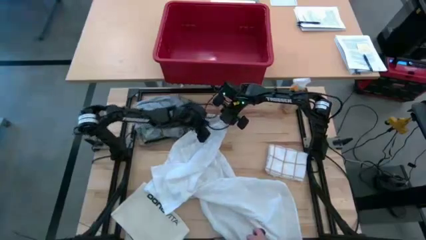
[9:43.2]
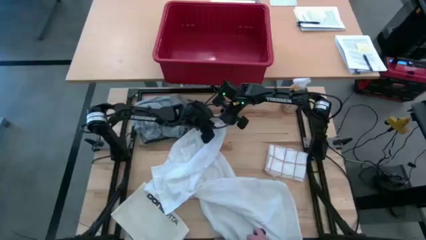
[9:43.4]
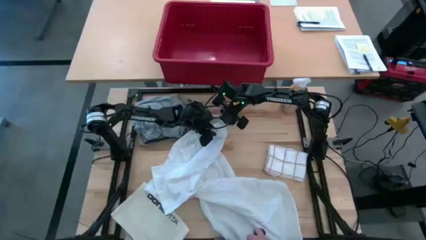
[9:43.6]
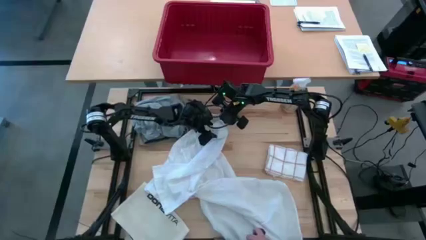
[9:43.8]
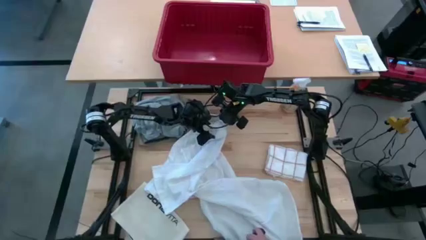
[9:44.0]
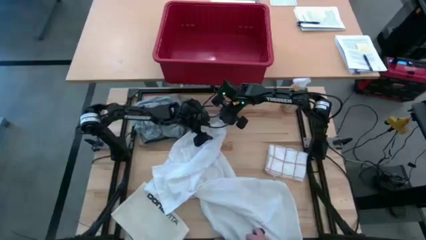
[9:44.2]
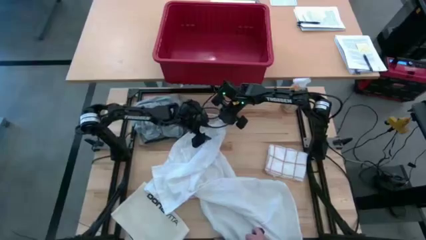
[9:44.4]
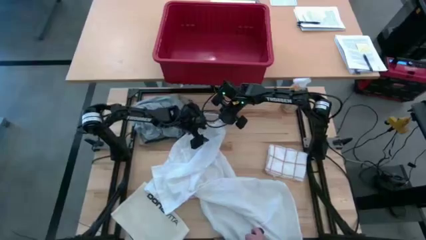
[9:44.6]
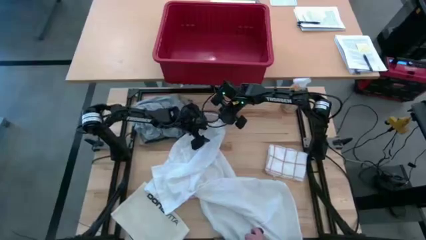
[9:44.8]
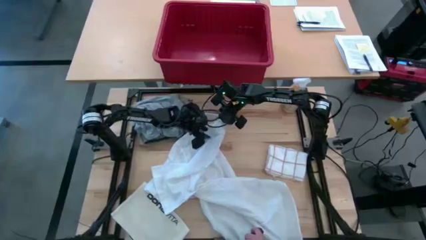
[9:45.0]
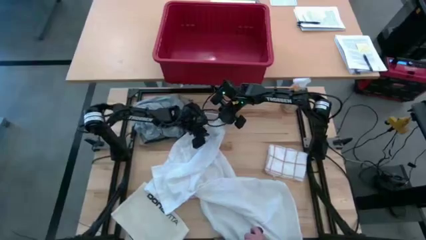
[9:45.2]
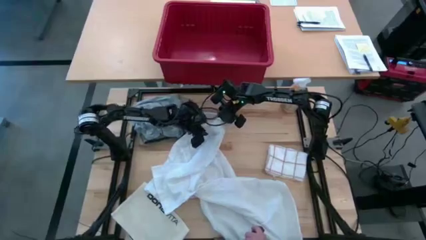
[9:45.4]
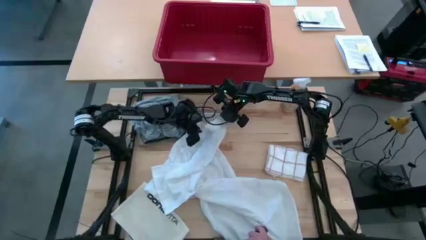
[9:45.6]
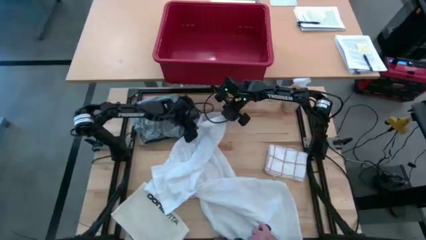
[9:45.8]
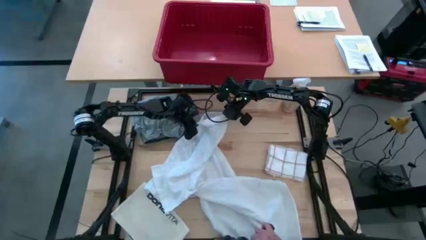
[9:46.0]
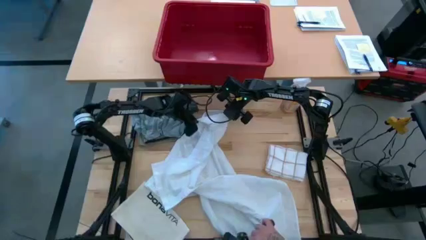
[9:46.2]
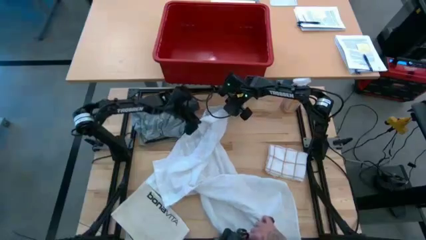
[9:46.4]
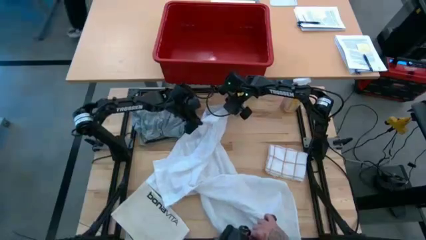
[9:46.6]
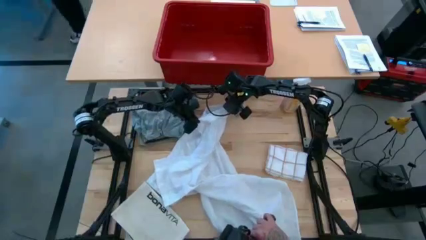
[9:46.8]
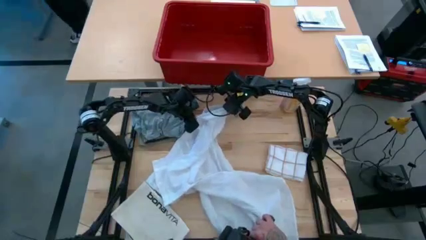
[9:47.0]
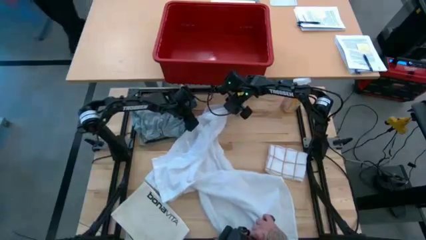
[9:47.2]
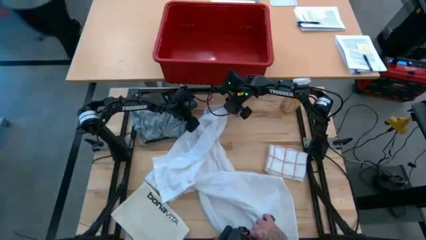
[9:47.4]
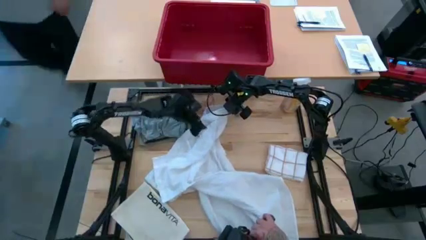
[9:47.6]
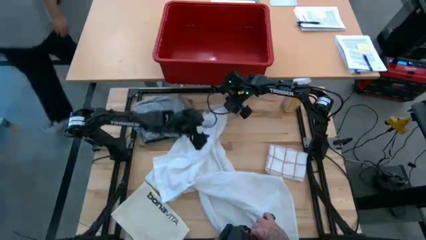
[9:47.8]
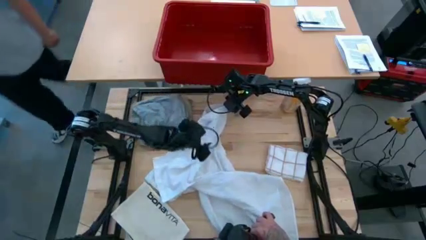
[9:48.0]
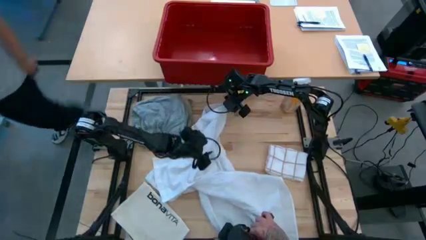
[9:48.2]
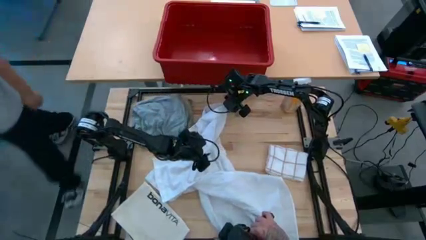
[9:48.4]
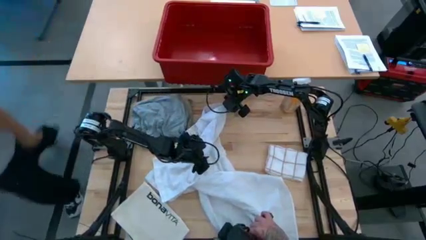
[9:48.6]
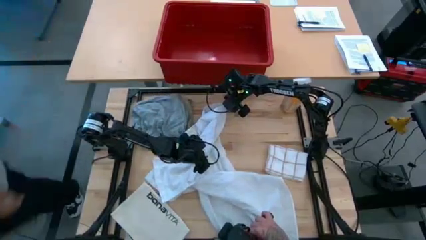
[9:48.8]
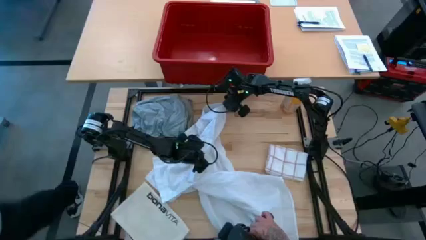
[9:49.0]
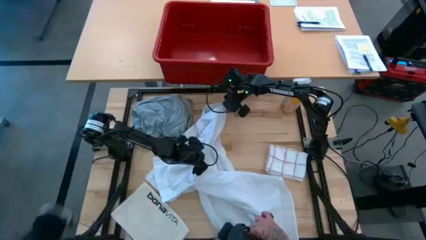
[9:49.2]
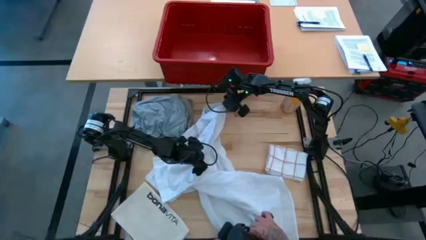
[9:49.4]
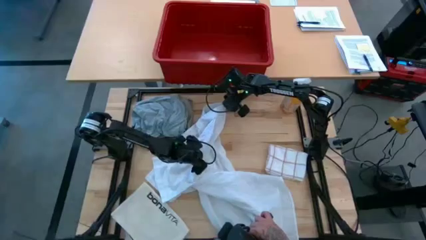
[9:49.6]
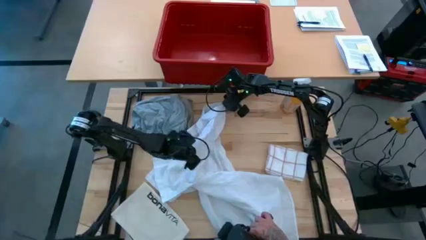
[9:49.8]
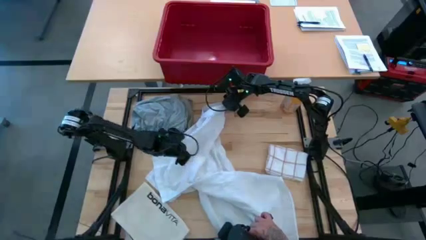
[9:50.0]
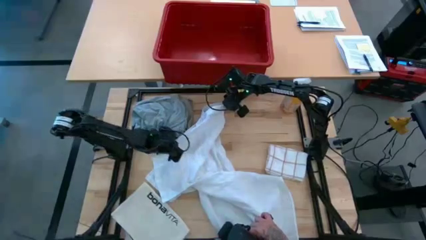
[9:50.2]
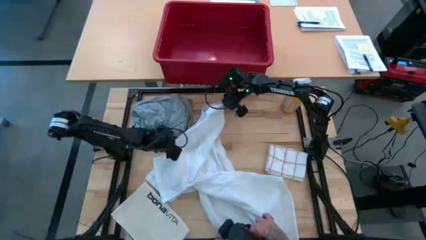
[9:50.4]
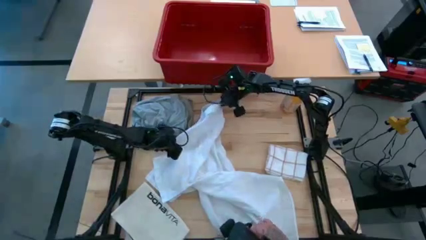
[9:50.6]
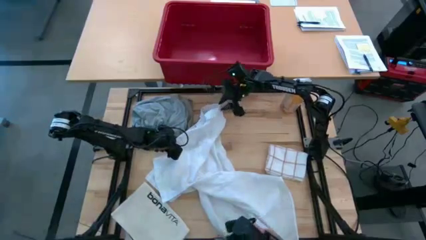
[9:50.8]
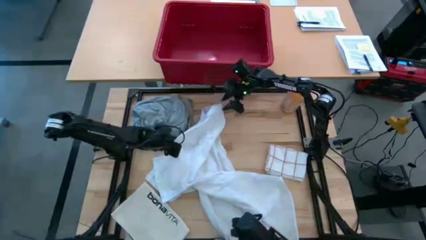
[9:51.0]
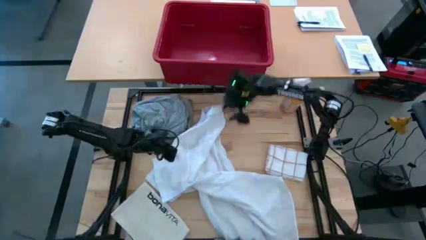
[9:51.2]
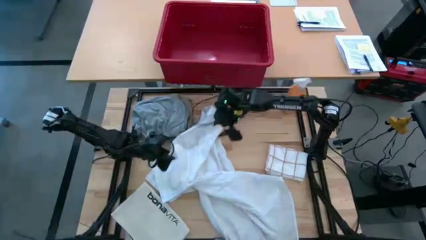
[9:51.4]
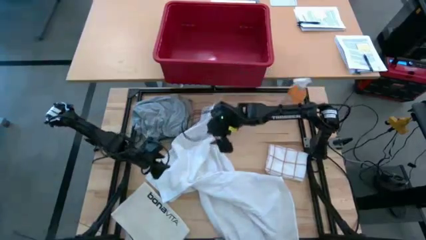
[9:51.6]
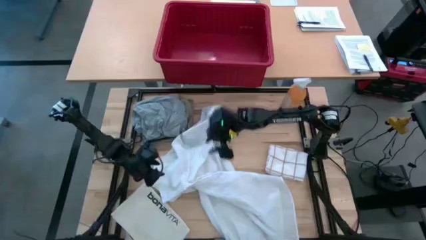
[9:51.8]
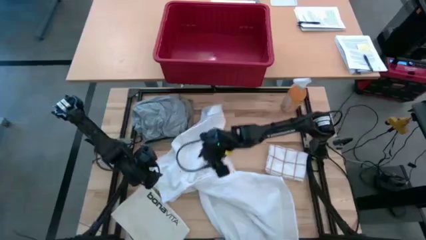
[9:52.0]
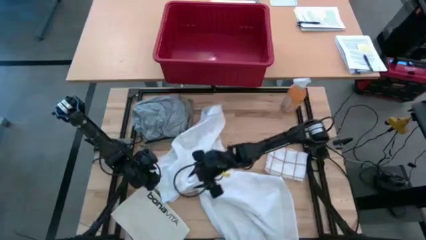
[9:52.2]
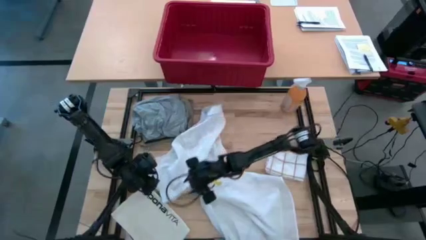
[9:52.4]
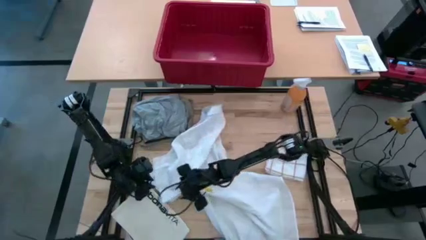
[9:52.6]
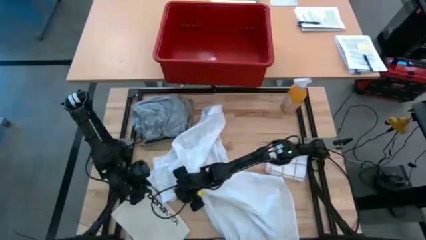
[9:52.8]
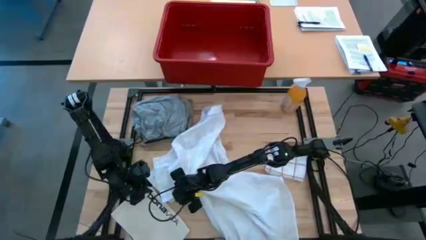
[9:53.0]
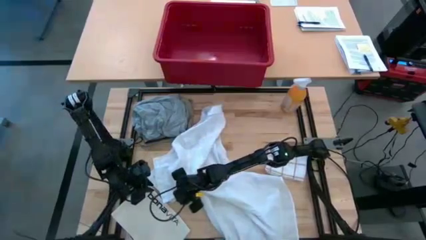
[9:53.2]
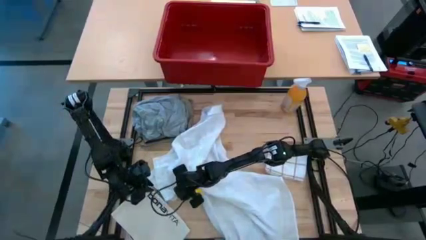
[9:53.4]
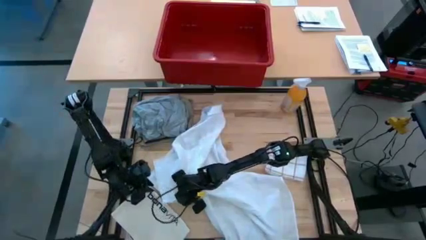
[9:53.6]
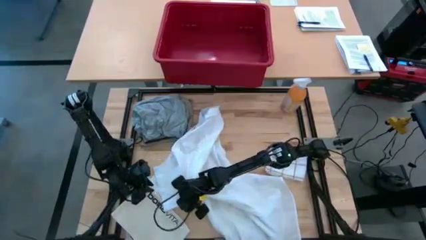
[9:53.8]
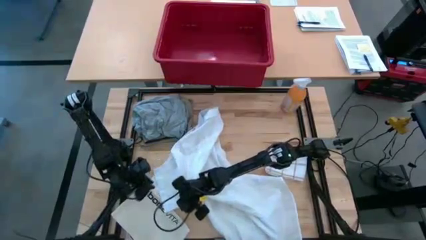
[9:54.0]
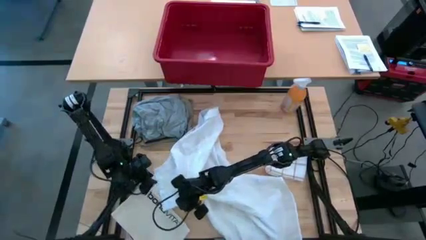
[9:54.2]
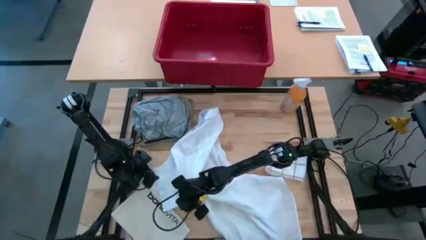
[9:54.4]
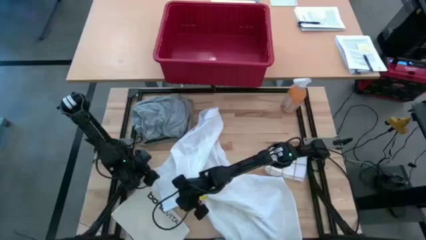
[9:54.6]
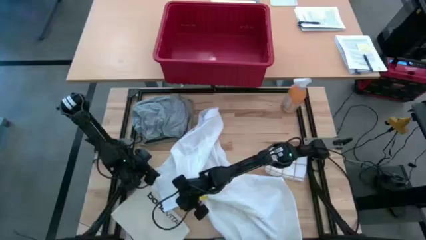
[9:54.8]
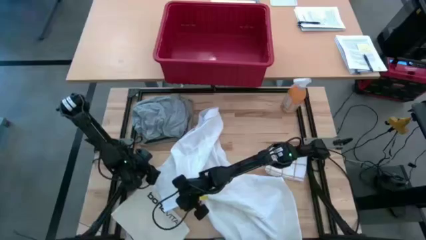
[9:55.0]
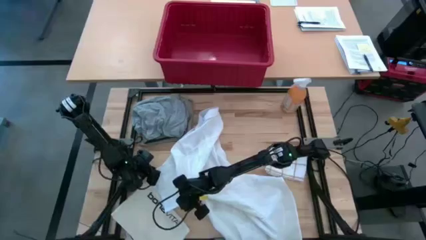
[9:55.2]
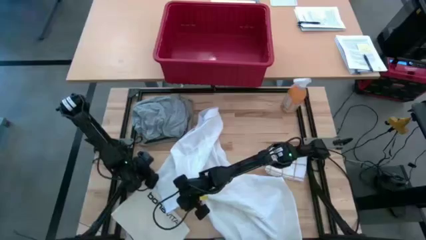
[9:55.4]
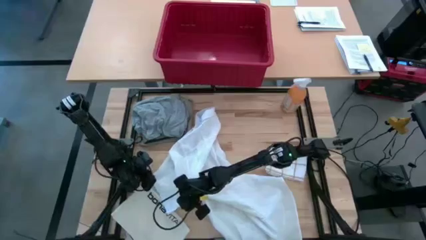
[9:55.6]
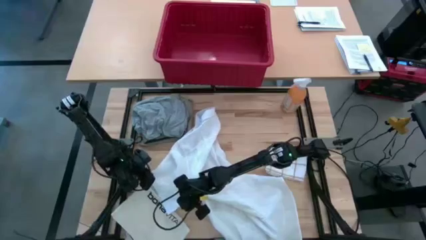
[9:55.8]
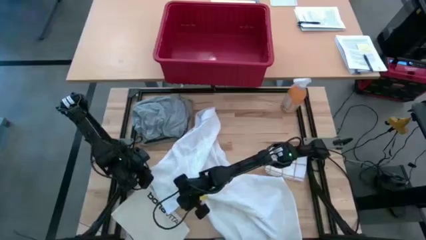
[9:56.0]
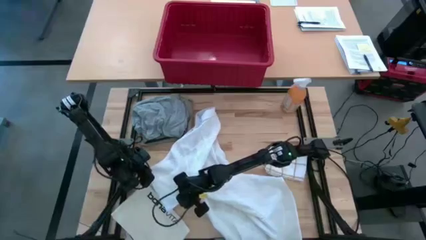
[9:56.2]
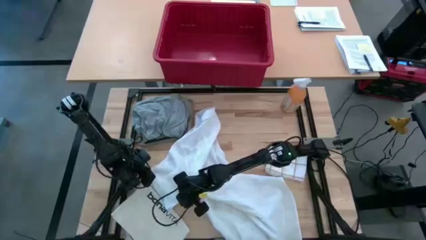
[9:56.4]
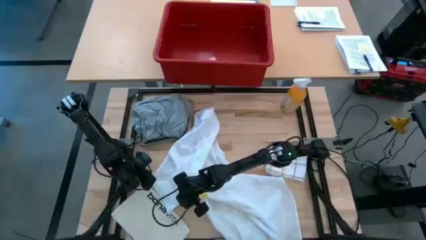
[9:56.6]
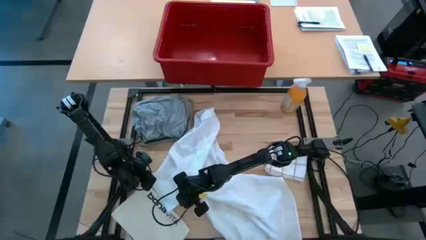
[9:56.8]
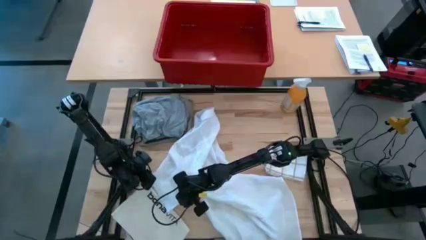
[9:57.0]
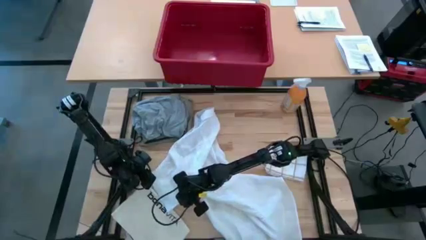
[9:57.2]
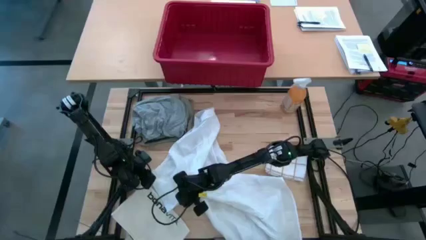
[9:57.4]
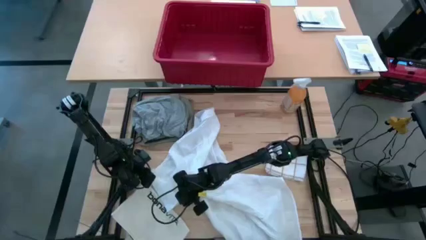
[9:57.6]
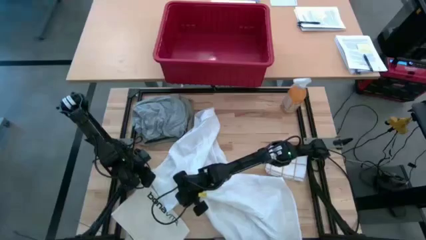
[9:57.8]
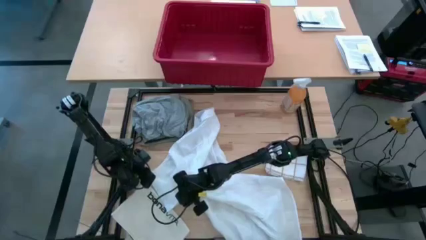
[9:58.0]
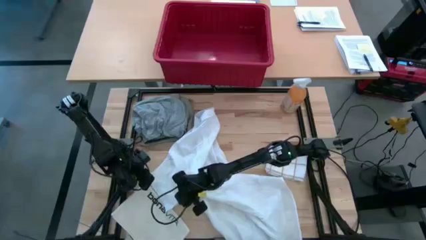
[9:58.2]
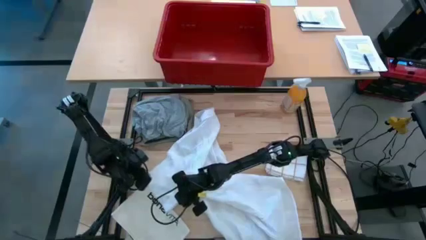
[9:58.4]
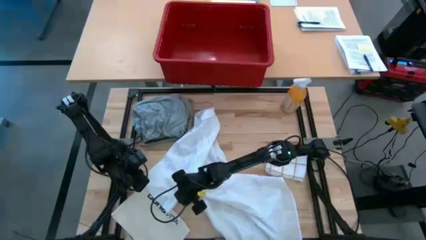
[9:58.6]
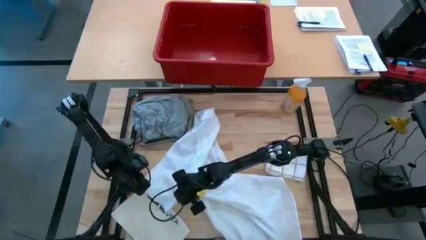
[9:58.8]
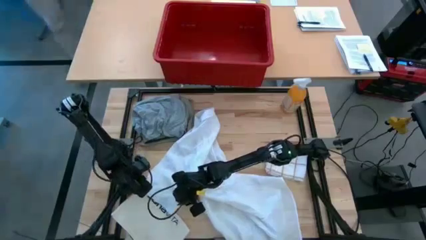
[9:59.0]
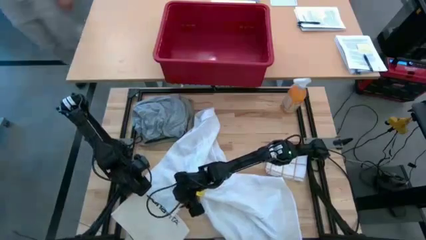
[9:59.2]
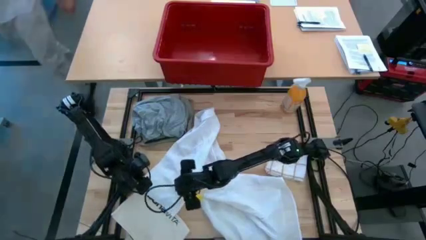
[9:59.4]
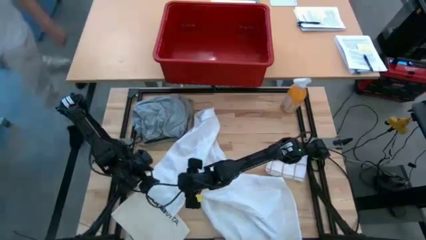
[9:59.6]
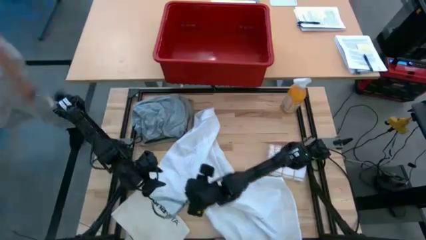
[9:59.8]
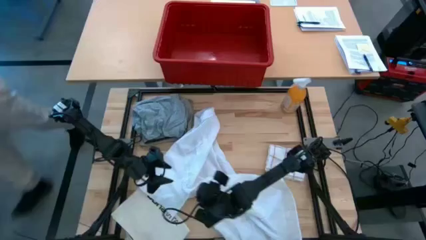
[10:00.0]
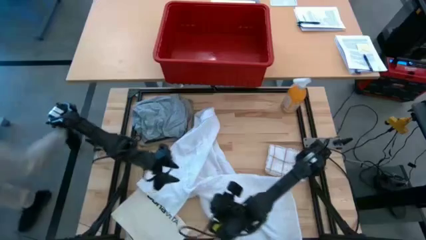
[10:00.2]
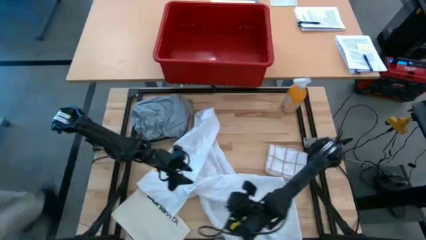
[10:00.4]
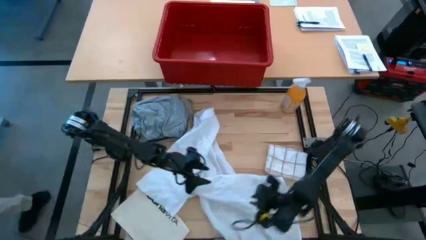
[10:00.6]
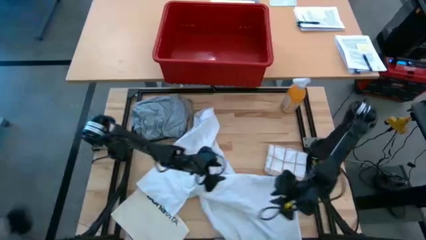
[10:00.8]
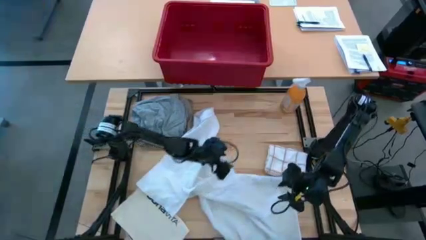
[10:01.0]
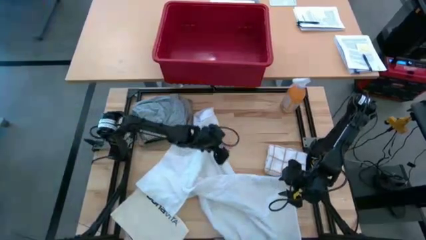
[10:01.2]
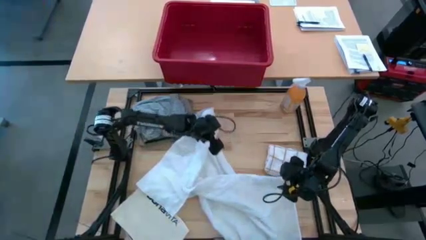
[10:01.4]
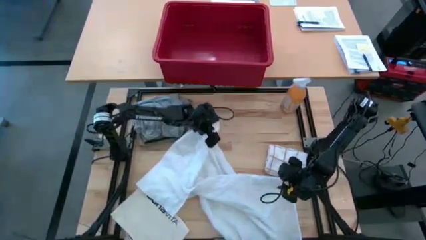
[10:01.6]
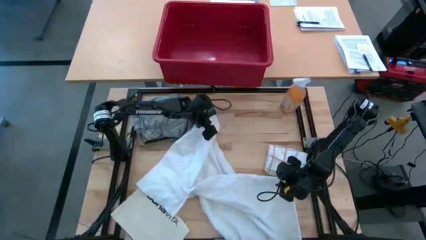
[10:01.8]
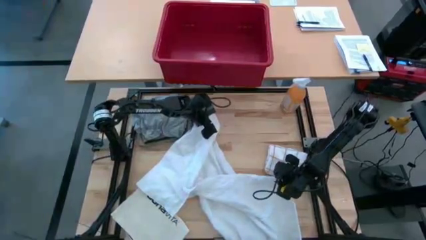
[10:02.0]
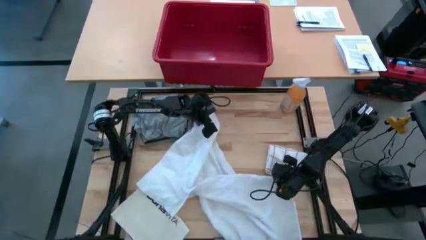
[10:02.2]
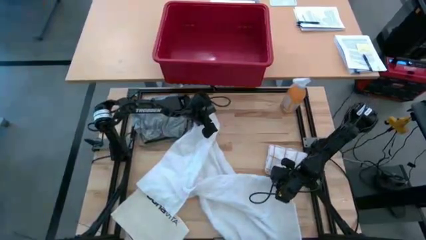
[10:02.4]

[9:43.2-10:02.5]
Task: Fold laundry
Fold the white long sleeve shirt
